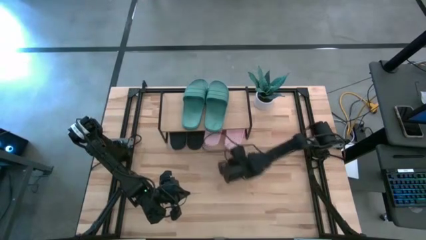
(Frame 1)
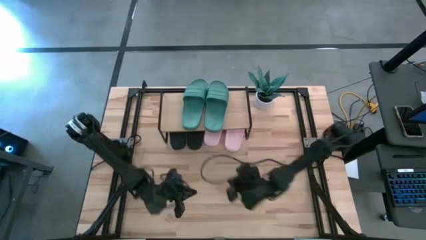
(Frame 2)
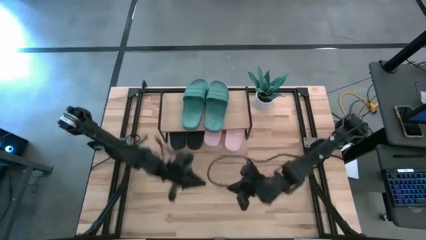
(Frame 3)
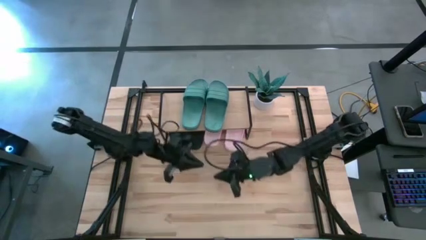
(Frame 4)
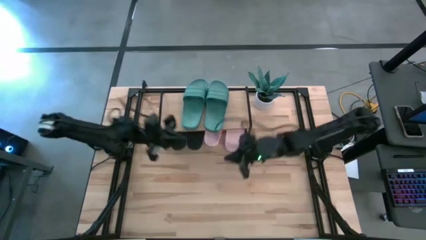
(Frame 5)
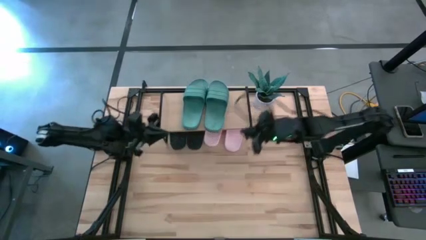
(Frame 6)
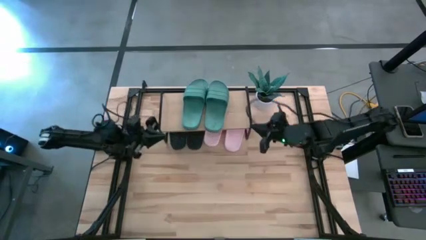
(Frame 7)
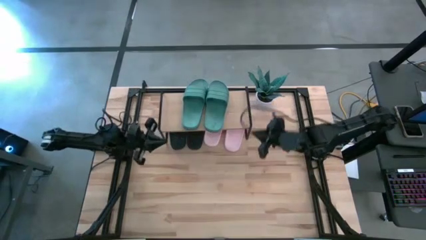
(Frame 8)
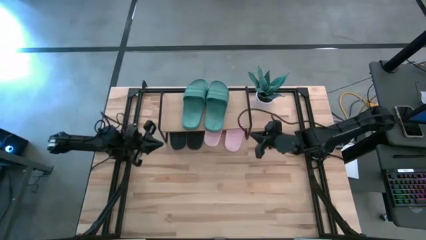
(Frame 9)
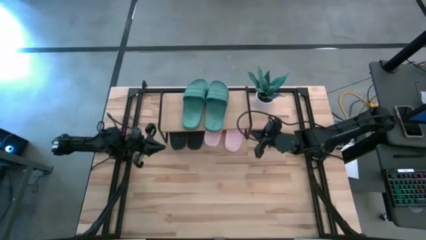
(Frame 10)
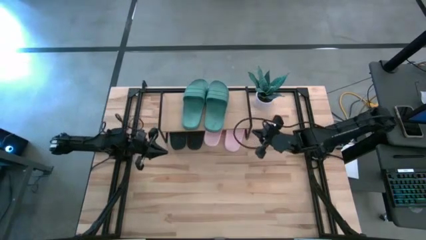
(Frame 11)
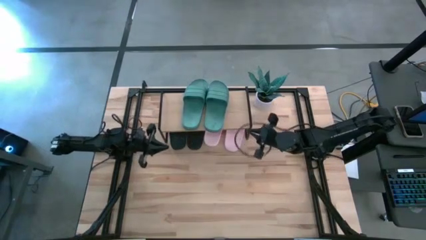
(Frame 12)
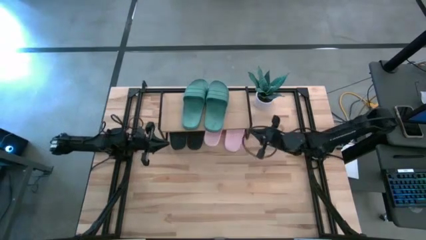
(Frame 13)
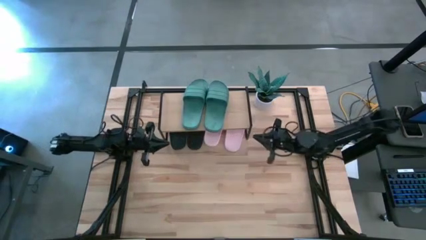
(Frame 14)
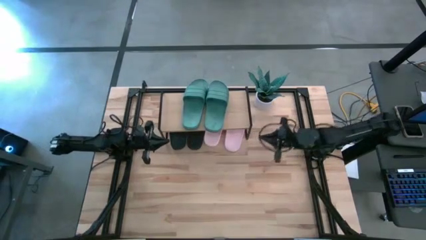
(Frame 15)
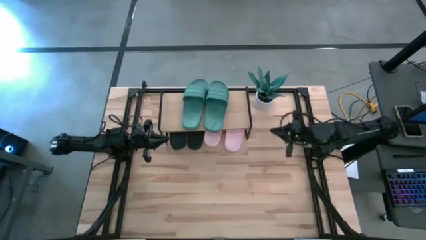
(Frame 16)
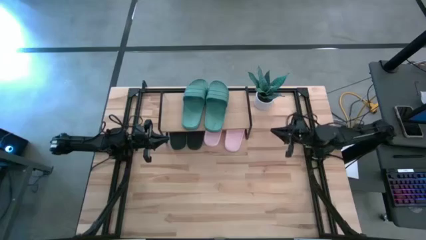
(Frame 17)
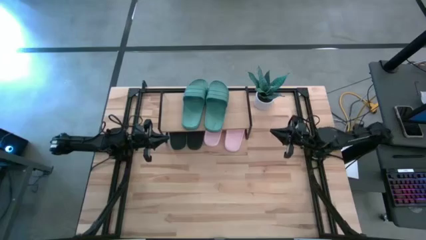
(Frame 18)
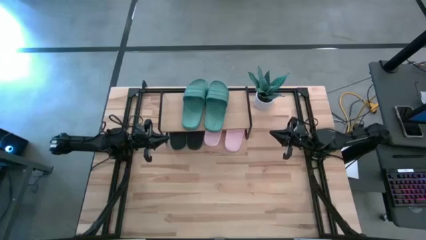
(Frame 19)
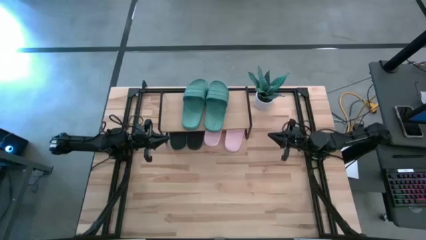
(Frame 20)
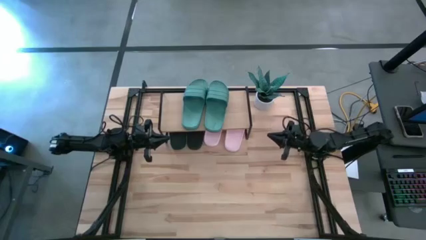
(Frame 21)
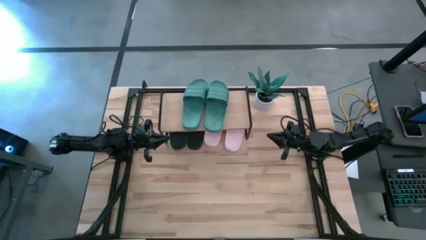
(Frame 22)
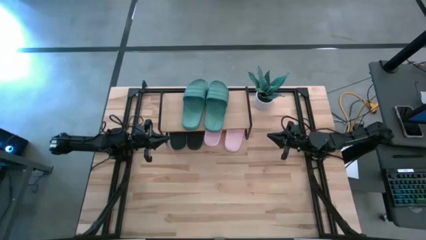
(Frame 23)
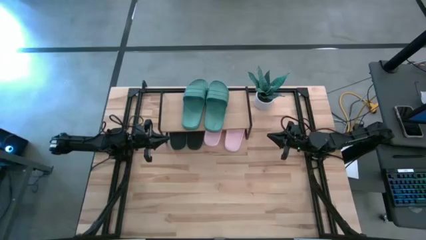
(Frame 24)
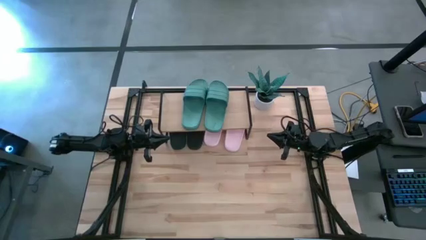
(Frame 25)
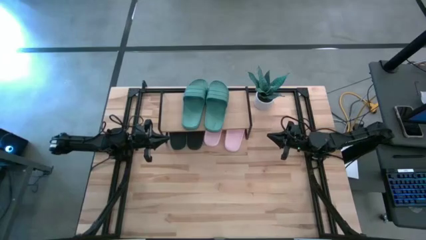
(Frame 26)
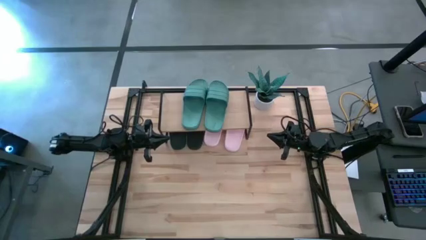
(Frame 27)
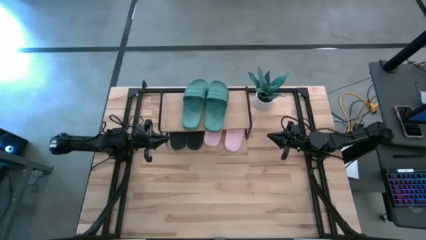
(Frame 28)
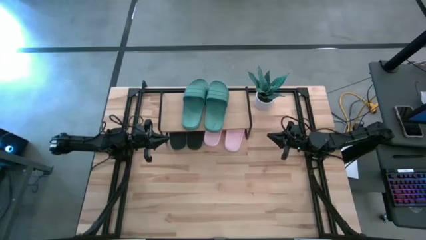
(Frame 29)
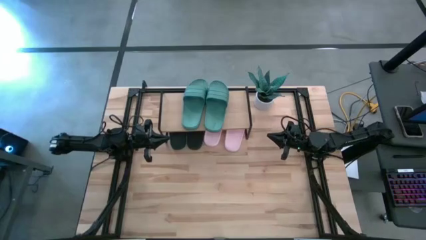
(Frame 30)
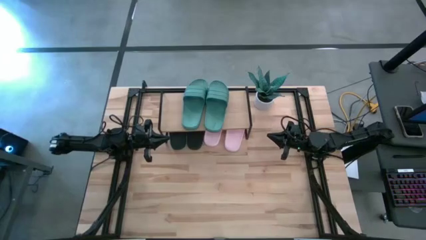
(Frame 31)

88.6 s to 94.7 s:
Task: Pick and place slides into the shelf
Return to Home Position

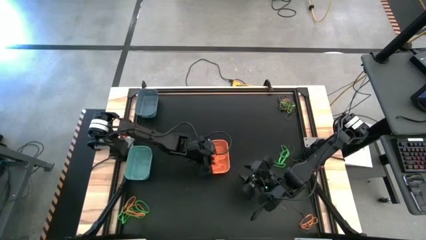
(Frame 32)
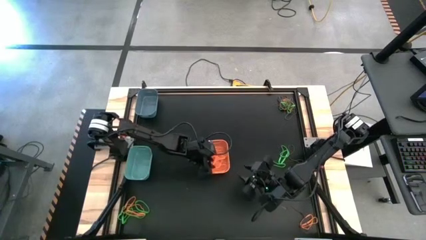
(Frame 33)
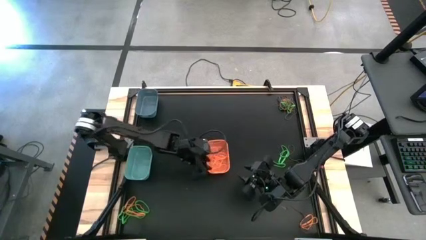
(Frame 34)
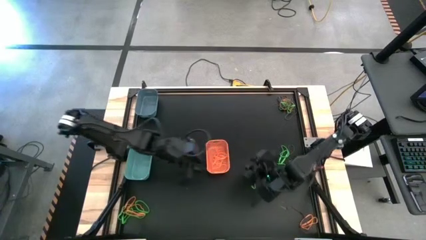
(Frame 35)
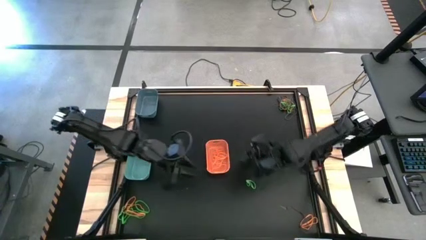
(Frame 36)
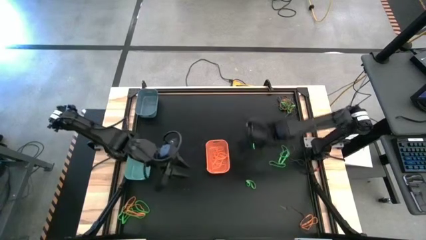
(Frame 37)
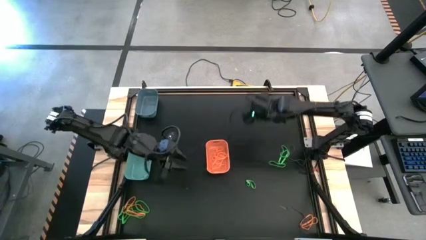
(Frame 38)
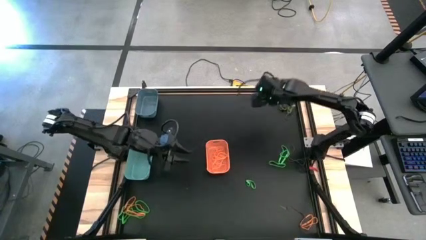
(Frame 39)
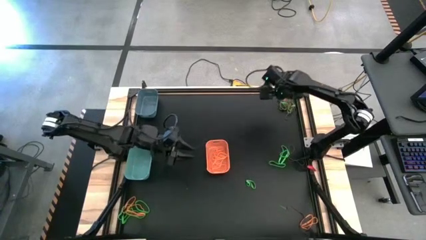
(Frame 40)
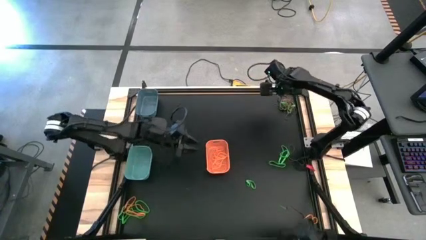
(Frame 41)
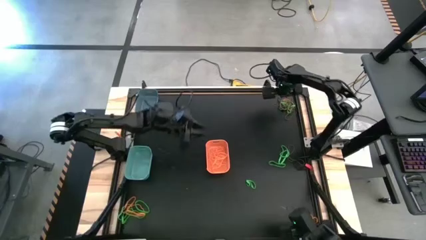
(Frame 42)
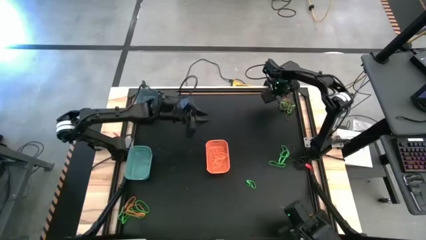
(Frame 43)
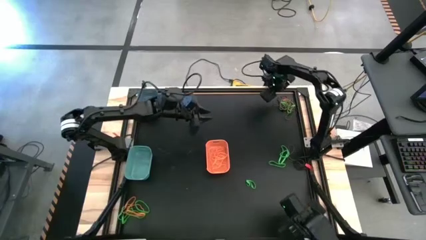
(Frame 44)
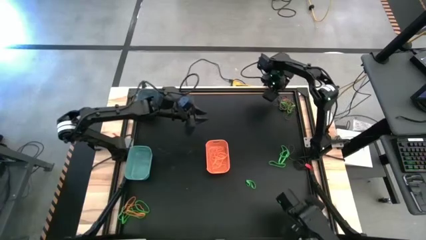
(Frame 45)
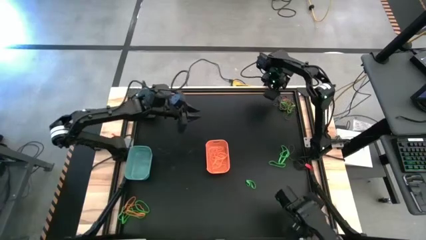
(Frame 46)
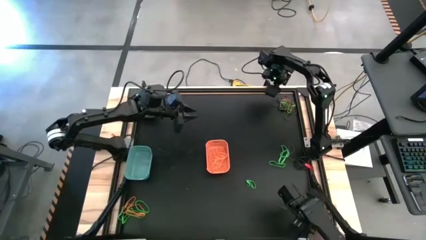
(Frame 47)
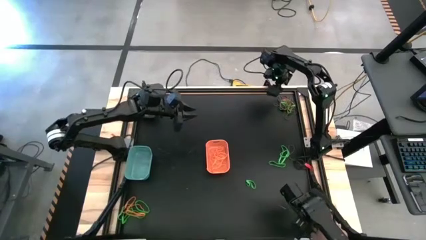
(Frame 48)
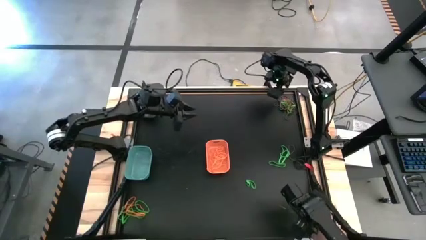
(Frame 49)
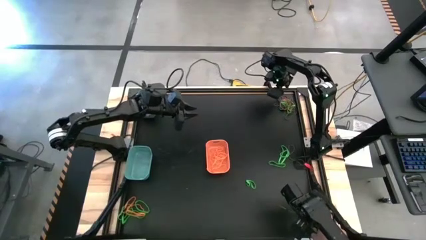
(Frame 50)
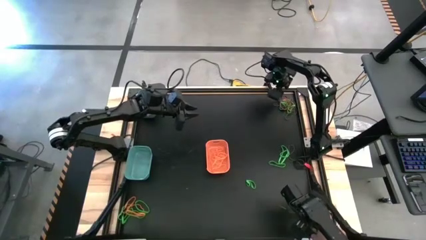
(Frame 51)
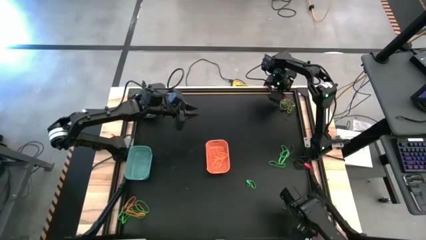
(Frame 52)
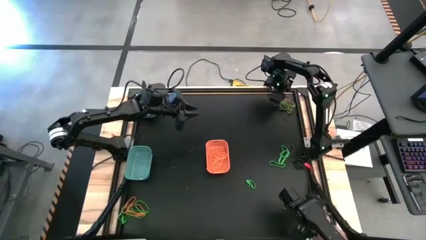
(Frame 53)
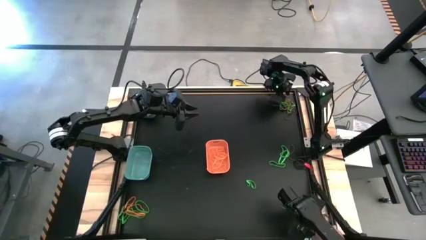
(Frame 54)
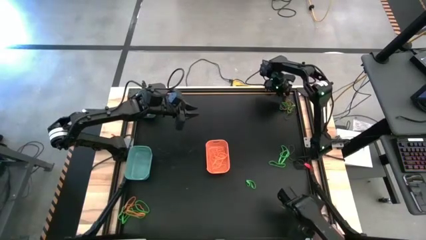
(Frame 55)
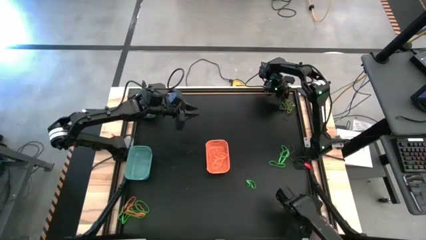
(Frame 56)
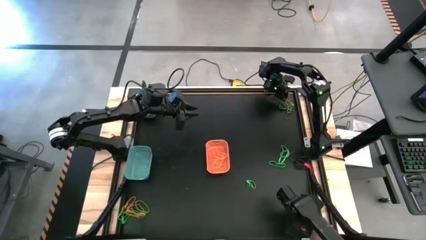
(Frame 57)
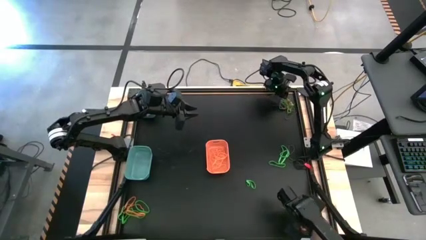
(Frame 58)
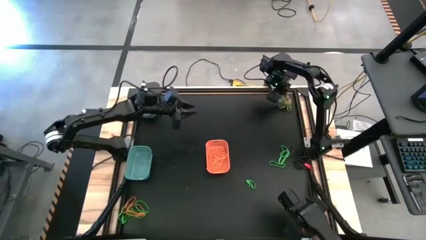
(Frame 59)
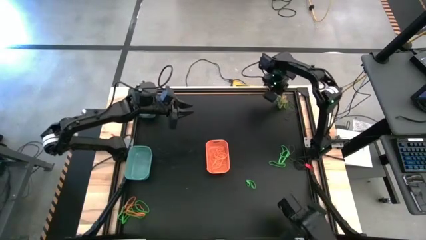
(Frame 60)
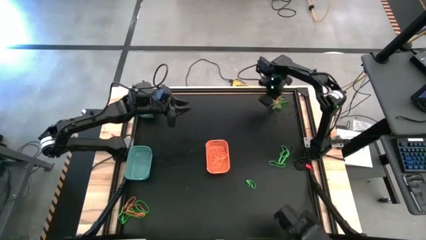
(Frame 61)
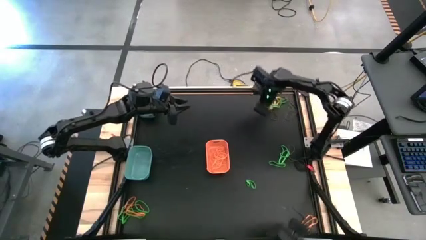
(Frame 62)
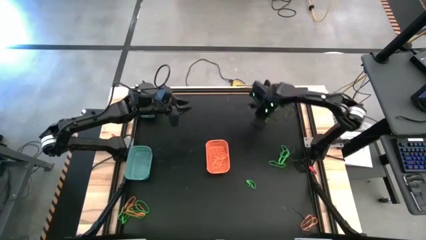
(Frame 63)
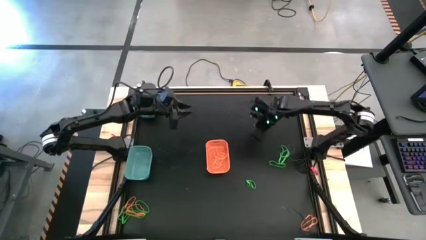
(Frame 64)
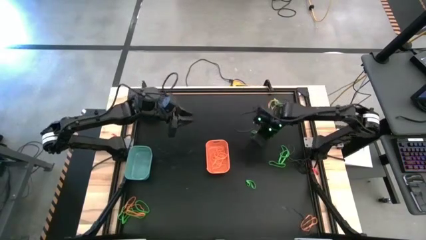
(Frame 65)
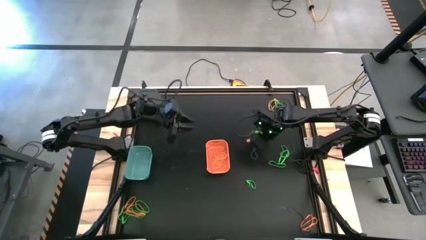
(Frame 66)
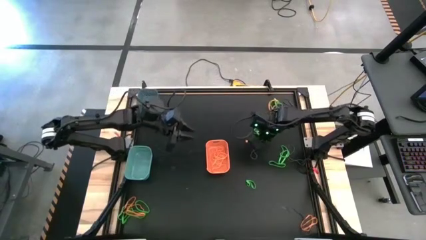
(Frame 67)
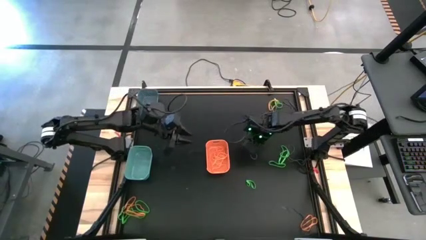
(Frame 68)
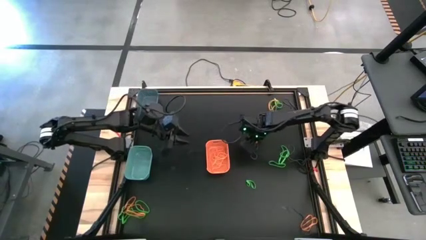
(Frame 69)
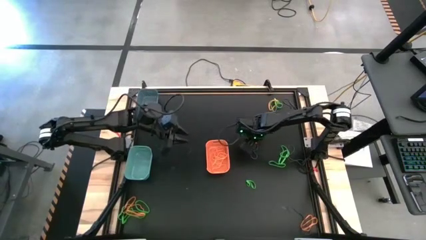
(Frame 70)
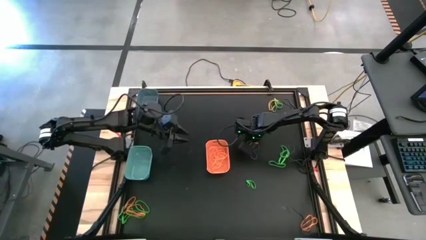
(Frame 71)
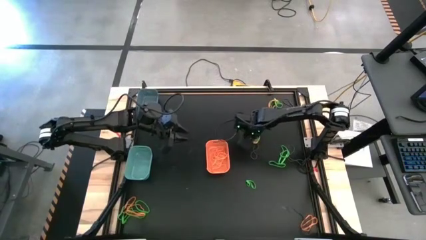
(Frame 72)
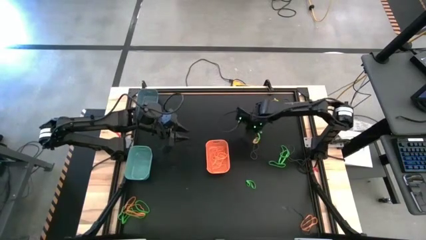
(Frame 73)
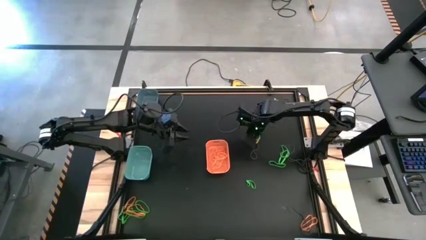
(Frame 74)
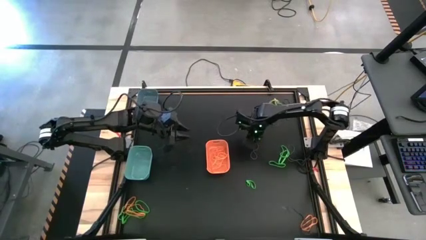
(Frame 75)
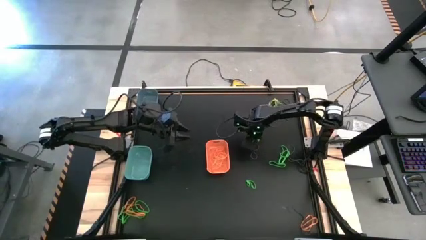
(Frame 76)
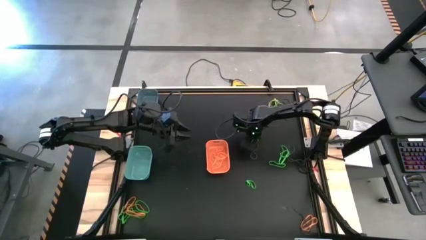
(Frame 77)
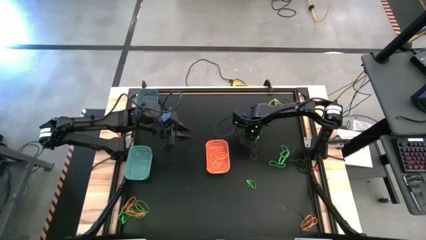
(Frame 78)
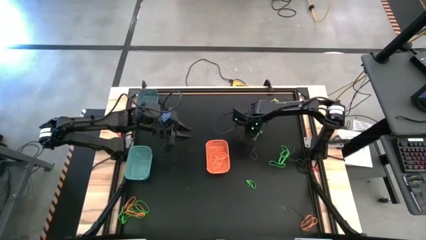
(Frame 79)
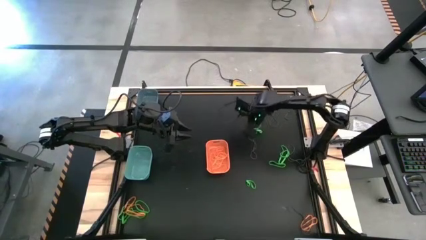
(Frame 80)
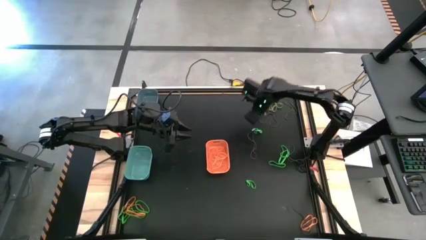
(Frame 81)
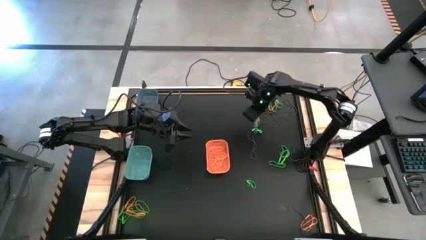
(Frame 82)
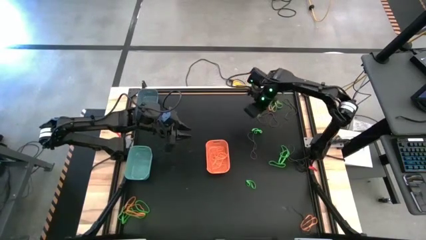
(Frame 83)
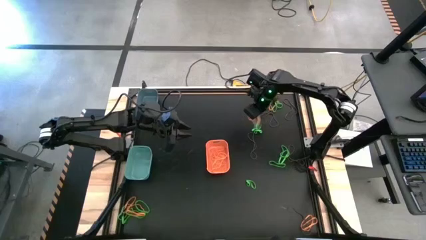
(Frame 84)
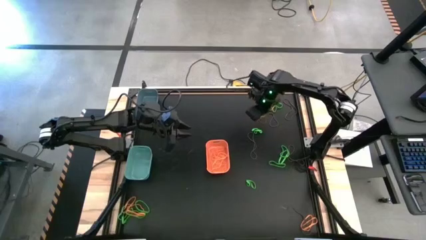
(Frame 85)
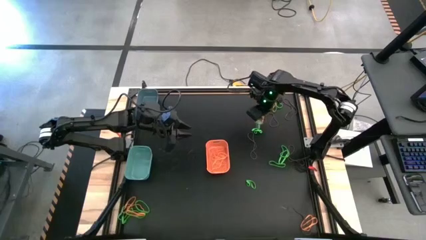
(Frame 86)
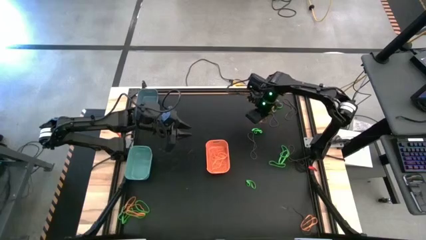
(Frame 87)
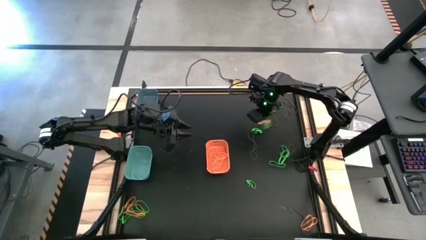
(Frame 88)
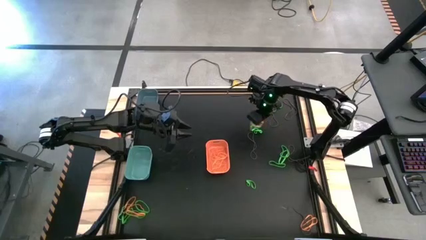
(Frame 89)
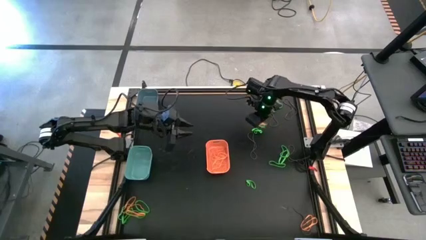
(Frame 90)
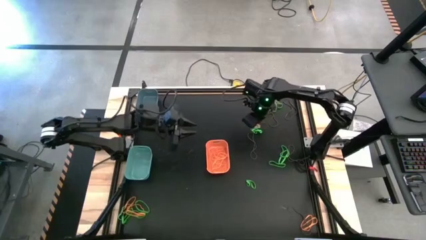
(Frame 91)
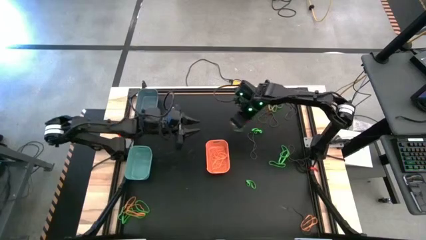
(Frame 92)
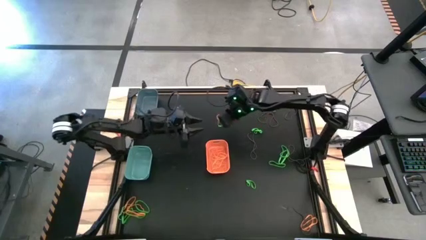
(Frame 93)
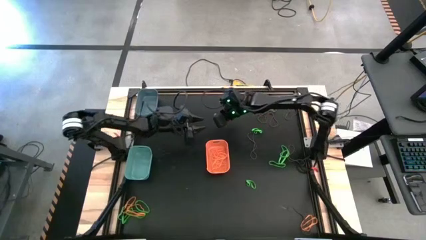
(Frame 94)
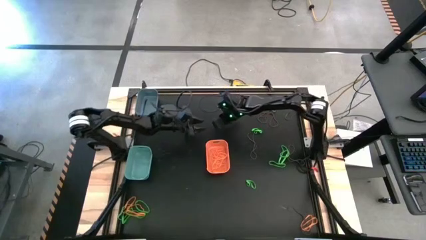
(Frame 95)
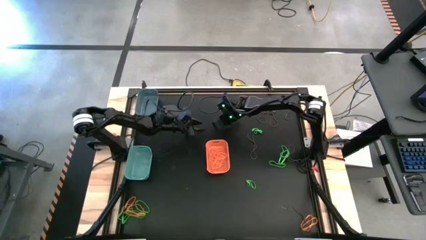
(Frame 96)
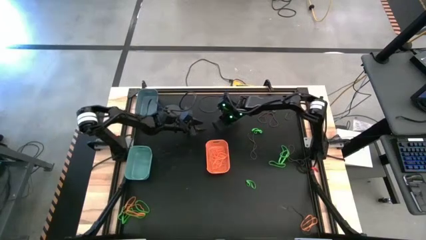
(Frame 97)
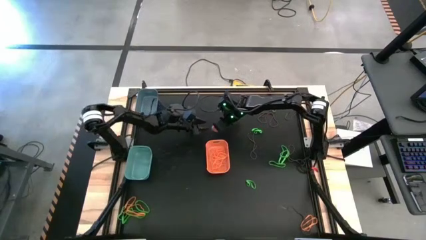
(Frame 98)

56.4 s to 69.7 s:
Task: Sort rubber bands into baskets
Put the orange rubber band into the orange bin
